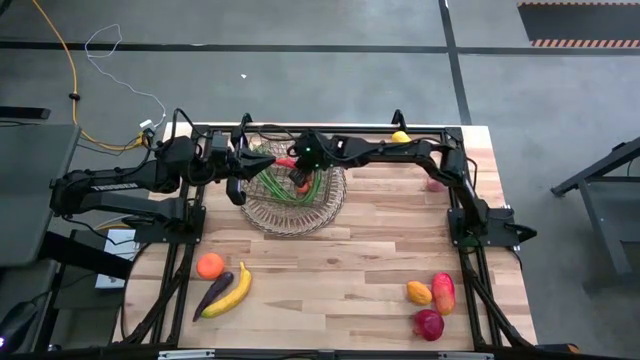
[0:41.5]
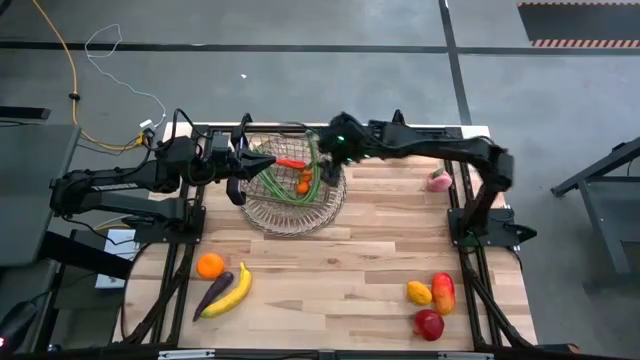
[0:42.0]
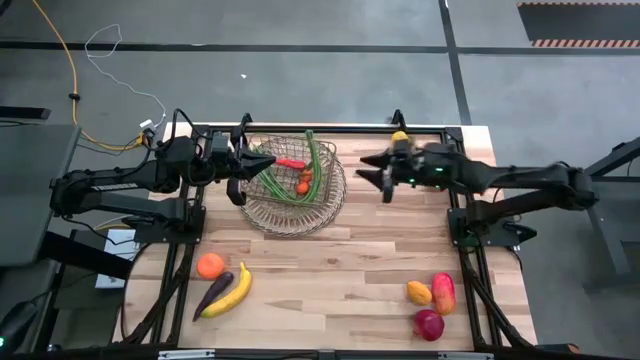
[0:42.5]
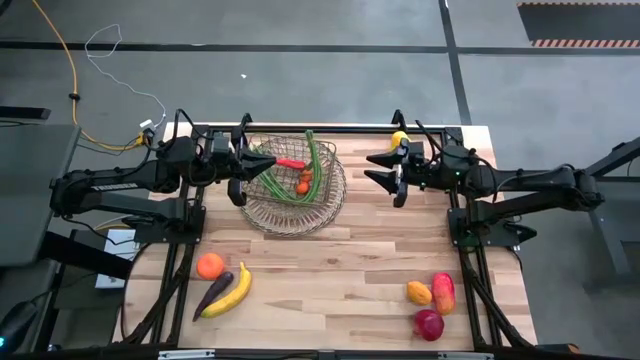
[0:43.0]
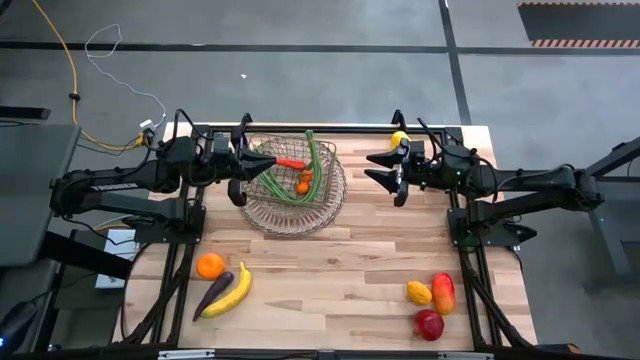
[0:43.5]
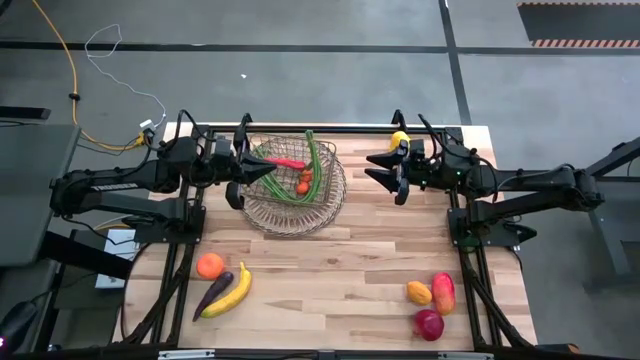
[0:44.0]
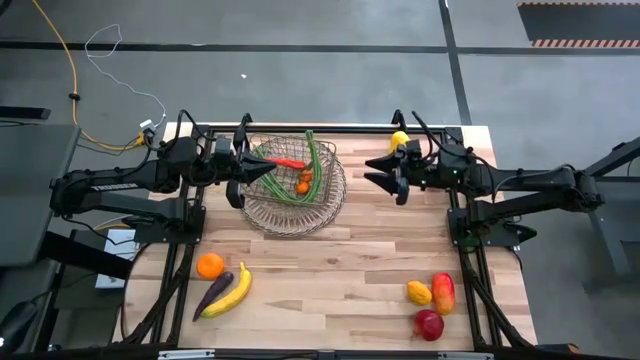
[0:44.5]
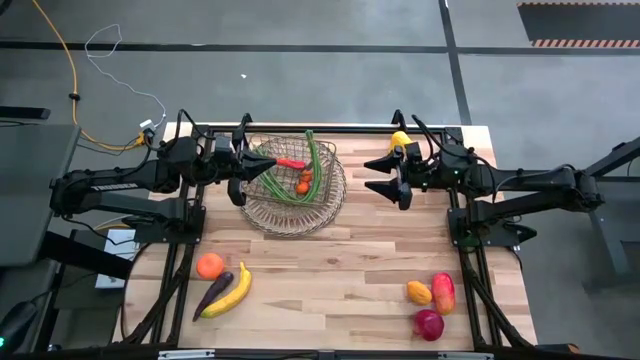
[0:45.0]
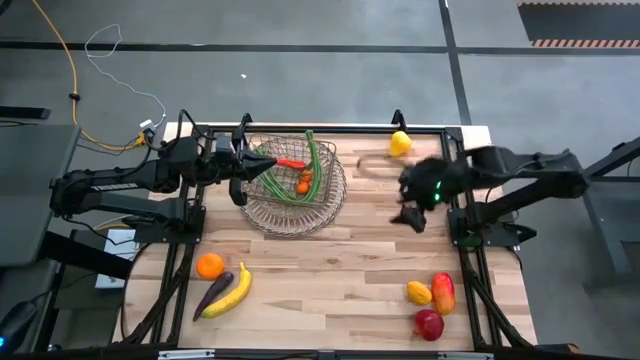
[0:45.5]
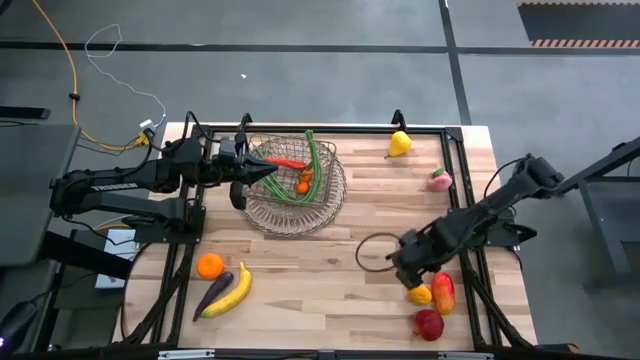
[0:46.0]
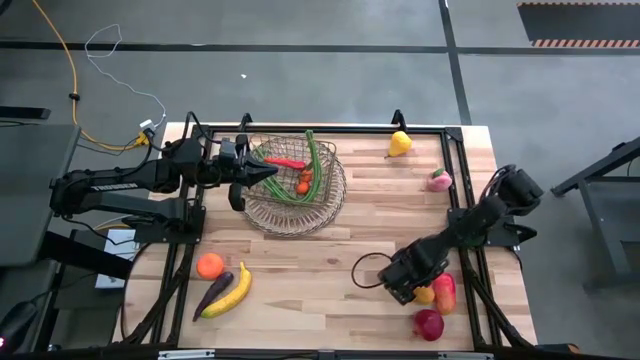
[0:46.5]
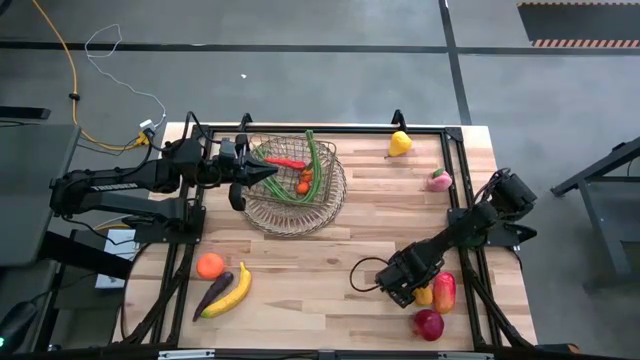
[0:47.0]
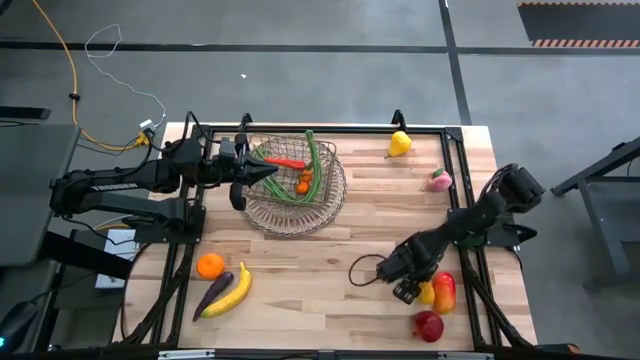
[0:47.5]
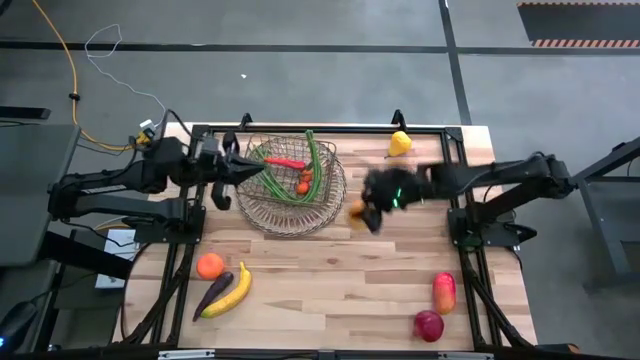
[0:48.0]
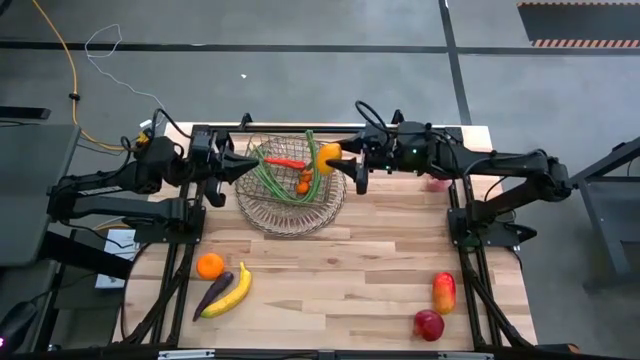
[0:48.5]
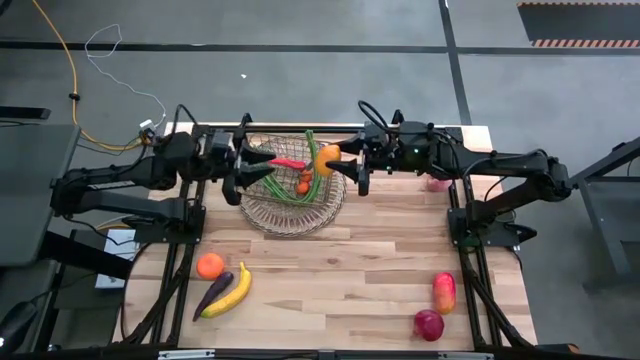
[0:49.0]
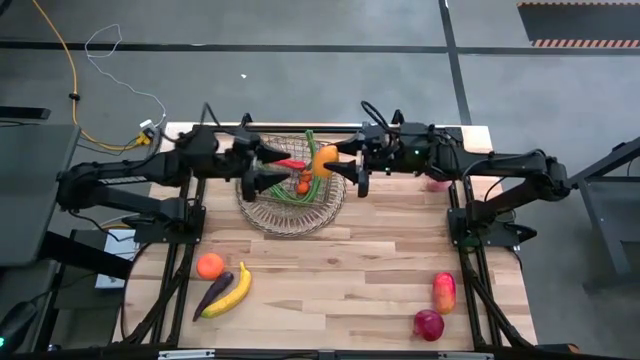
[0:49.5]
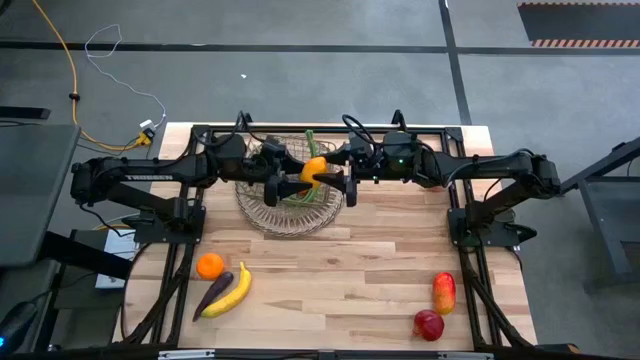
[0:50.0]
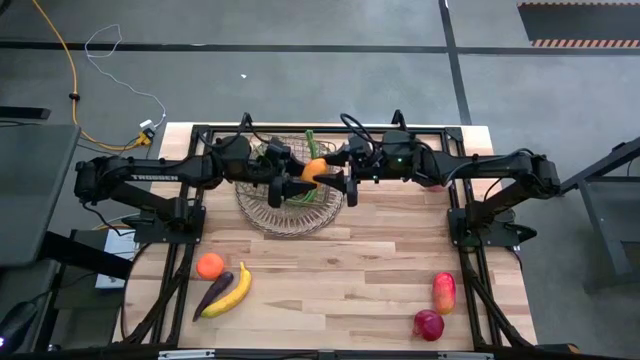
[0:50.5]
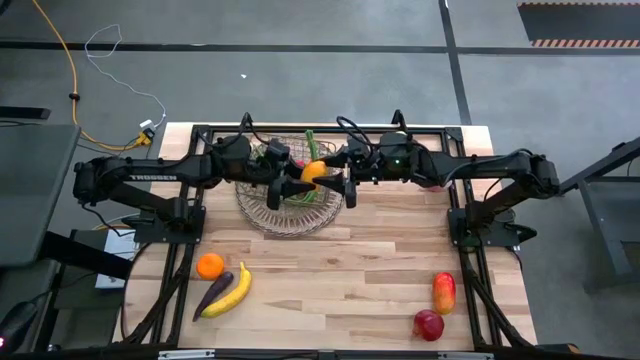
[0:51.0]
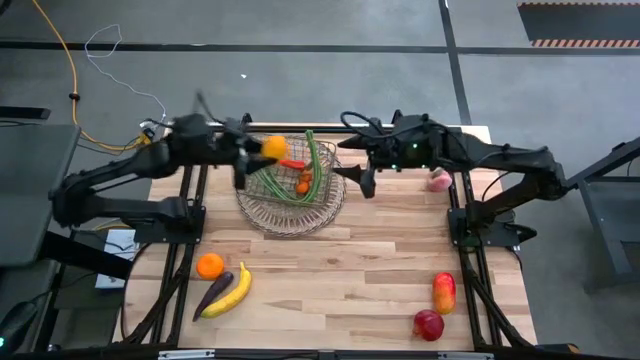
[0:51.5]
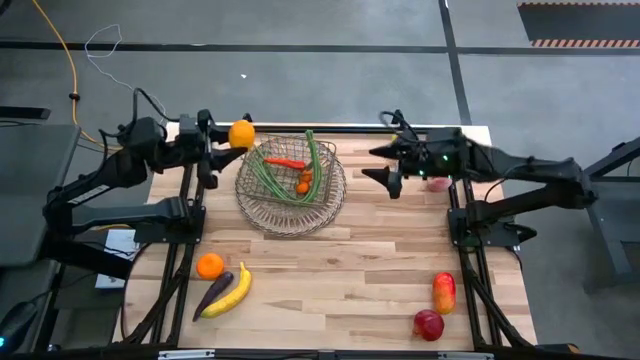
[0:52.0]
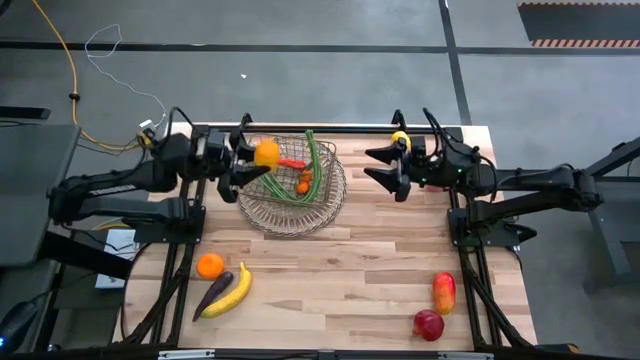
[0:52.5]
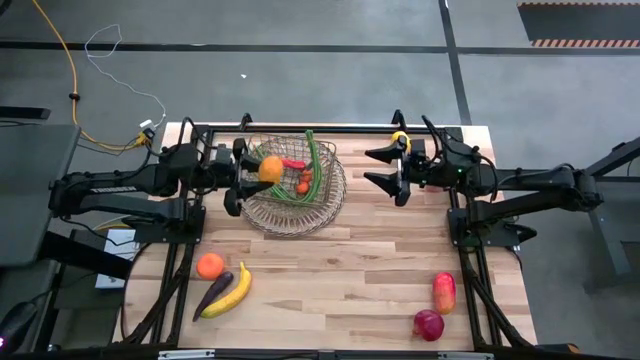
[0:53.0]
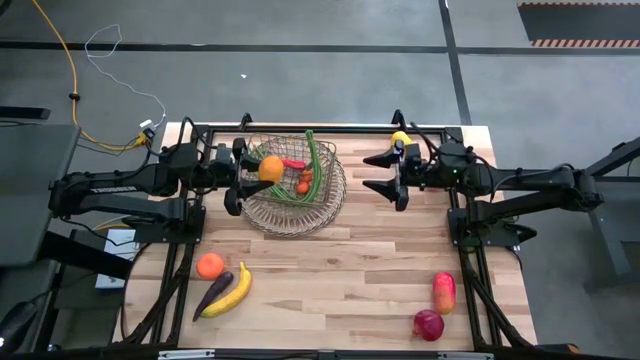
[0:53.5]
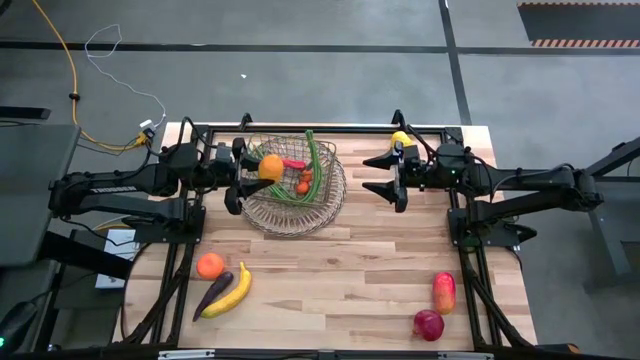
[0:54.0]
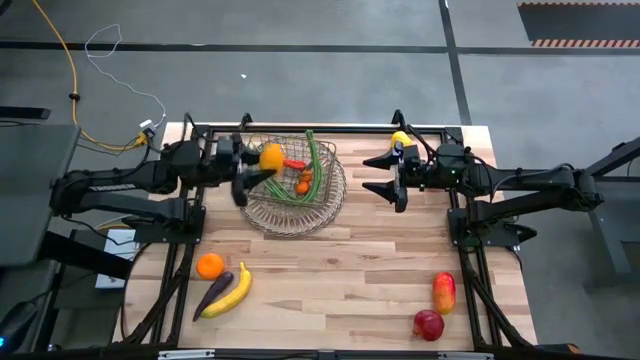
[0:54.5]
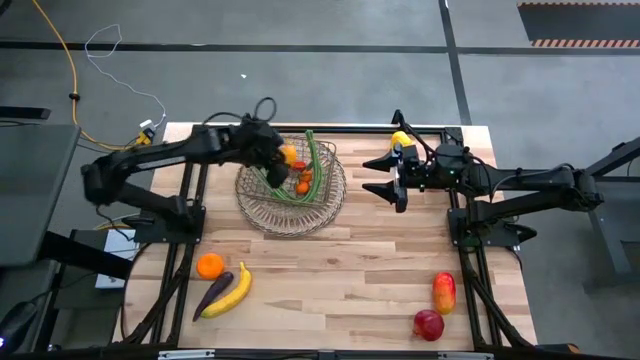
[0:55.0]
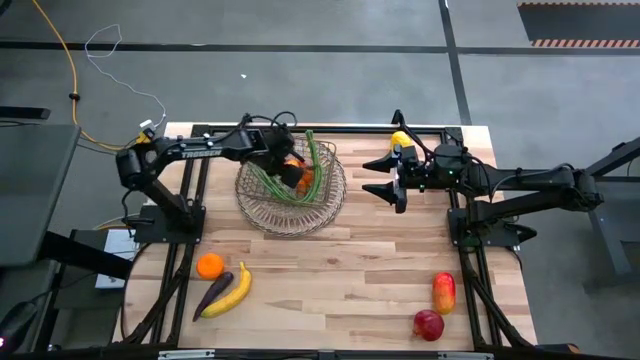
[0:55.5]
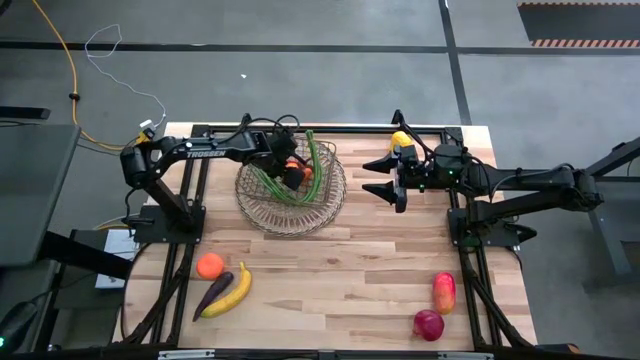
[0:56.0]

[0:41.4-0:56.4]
Task: Build produce basket
Put the yellow lemon into the wire basket

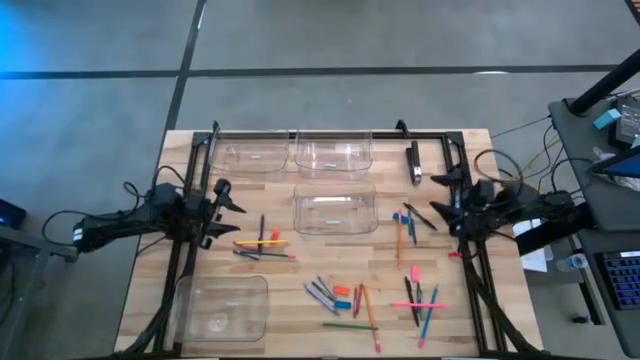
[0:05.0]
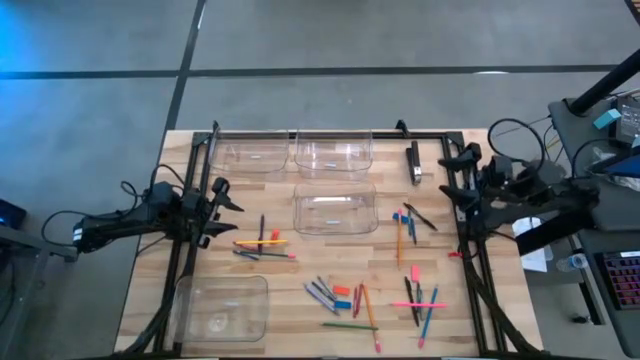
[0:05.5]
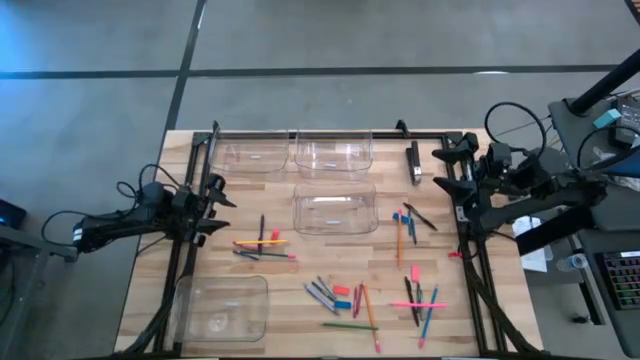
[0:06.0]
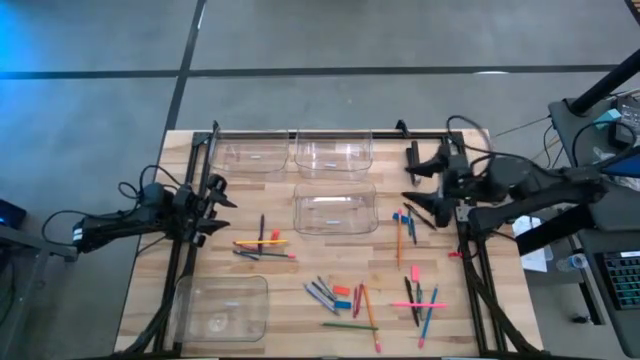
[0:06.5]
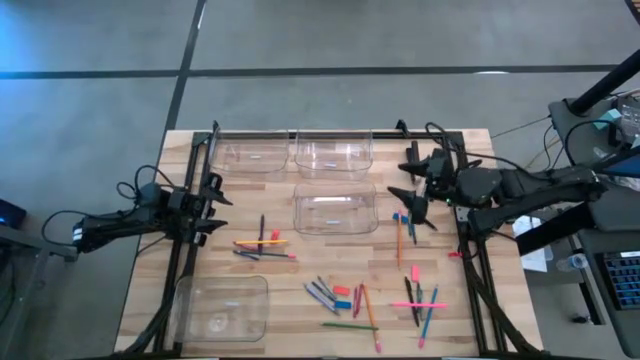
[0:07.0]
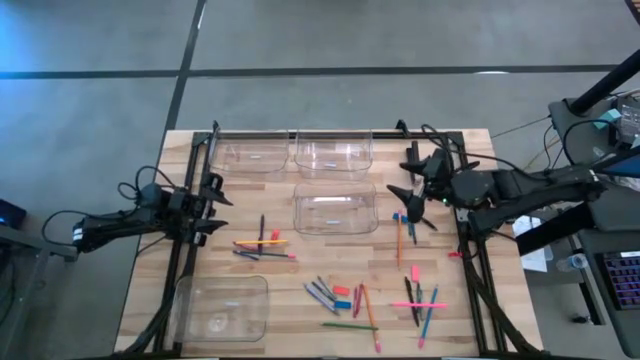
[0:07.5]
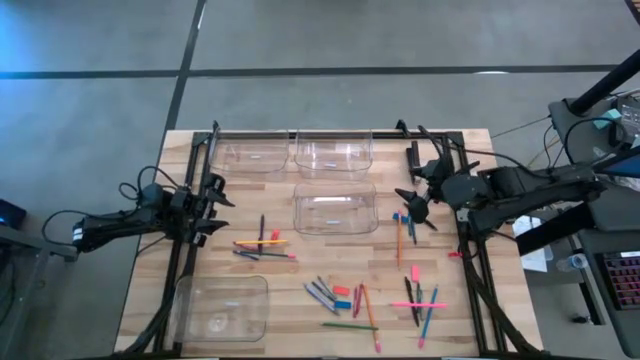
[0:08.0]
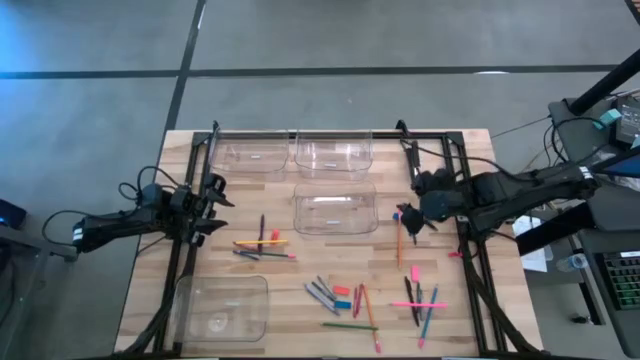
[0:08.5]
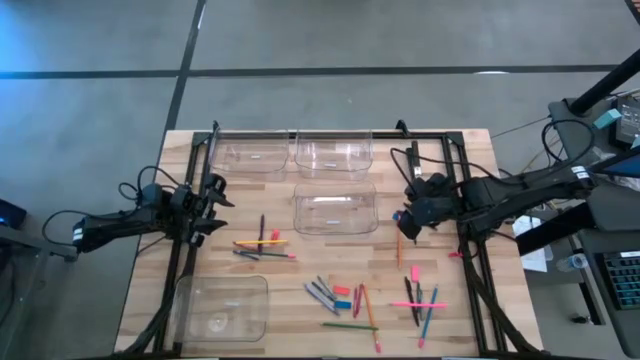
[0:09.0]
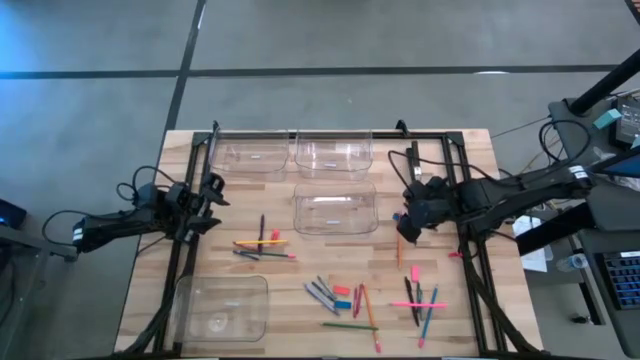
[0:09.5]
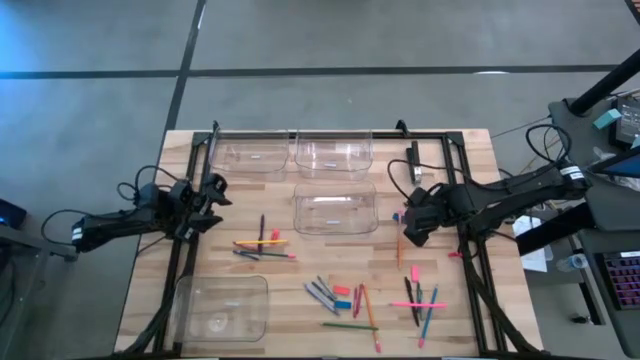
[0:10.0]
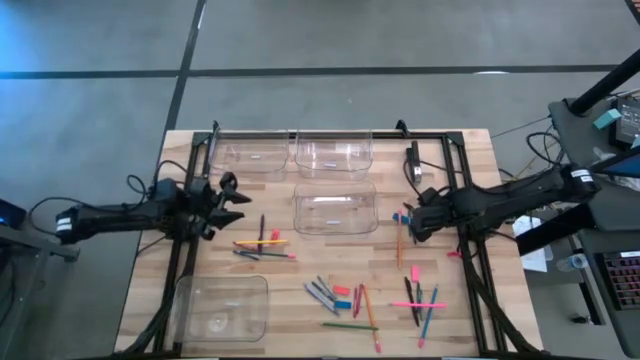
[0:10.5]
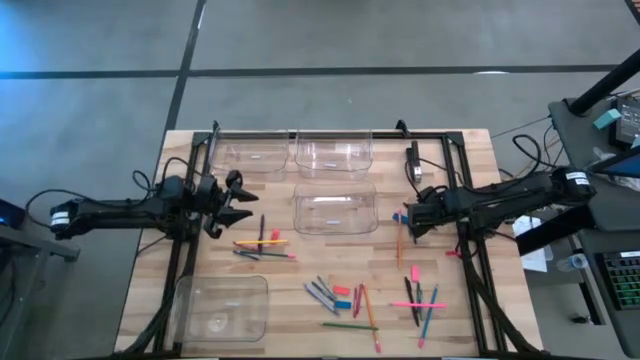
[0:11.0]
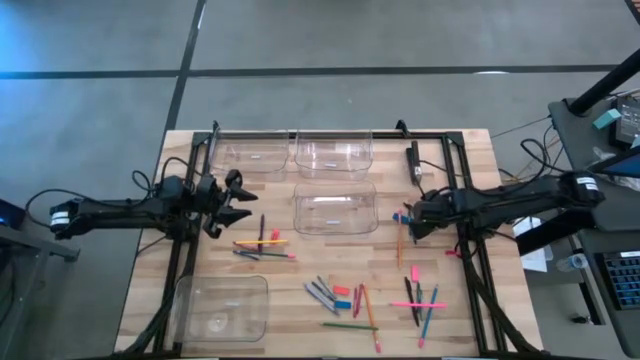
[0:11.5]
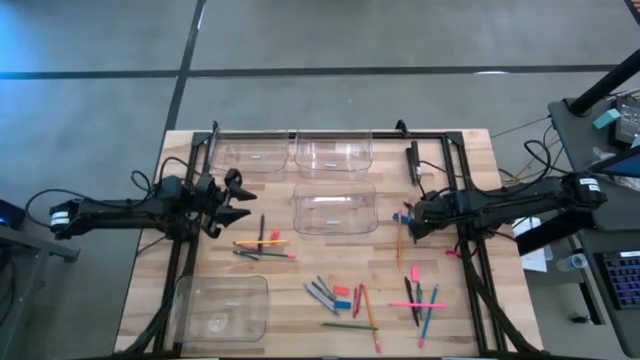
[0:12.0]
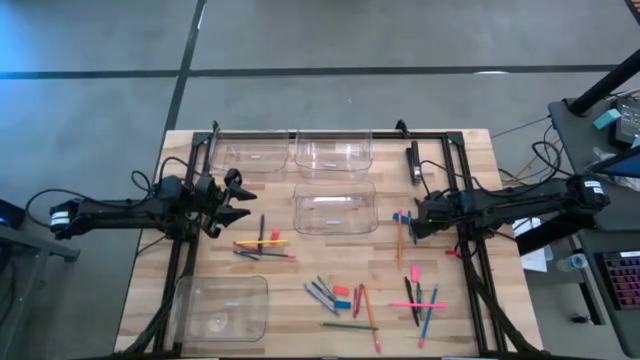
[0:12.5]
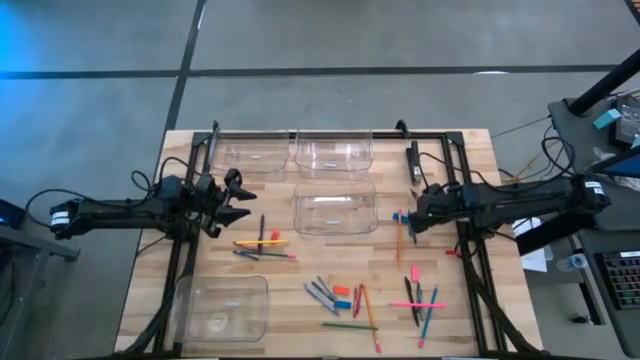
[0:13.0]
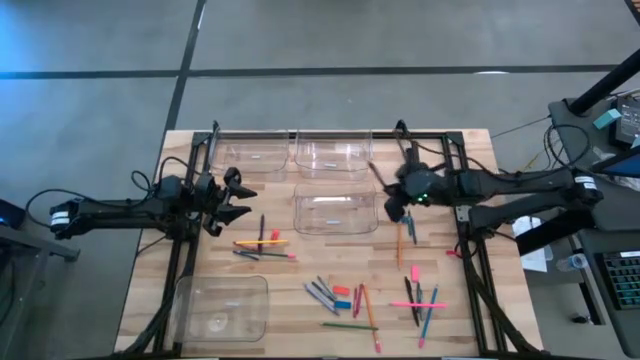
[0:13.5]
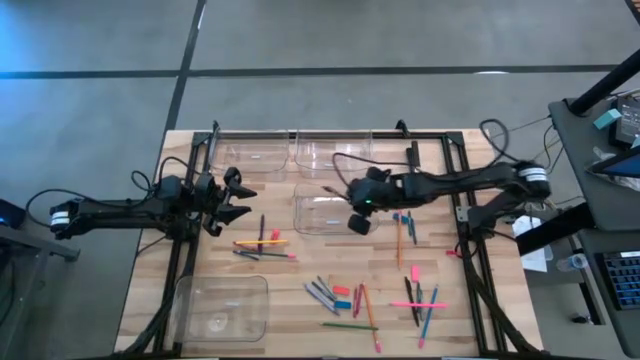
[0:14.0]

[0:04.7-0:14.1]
Task: Sort crayons/erasers/pens/pencils in bins
Put the top black pen into the middle transparent bin
